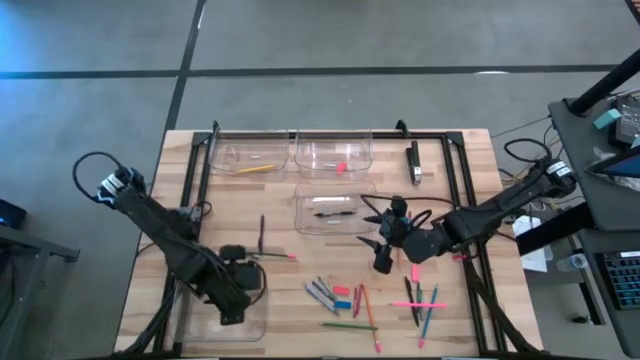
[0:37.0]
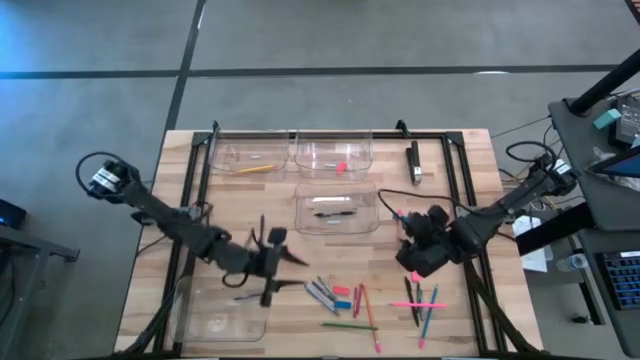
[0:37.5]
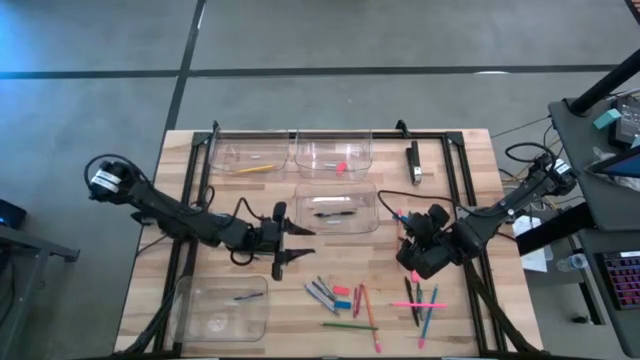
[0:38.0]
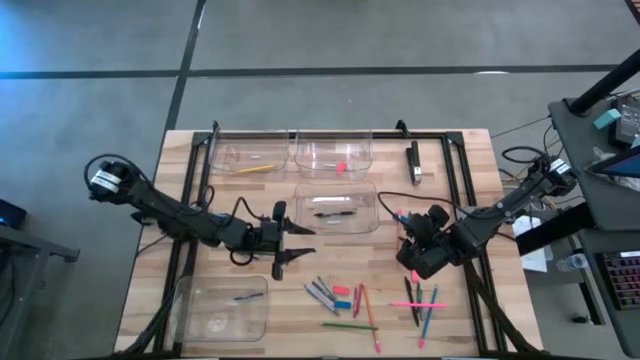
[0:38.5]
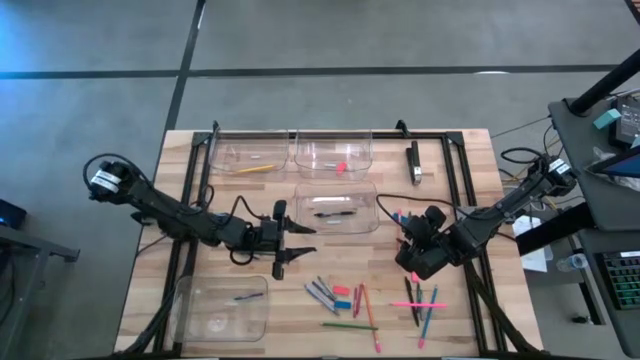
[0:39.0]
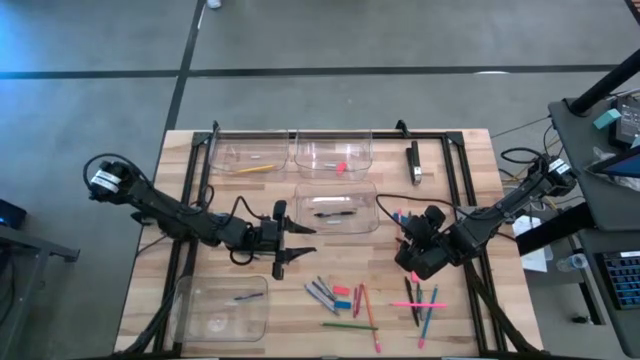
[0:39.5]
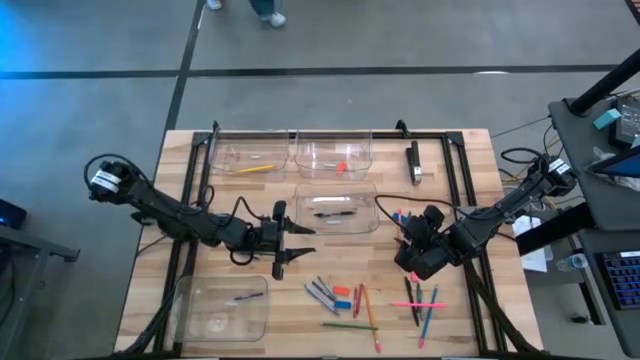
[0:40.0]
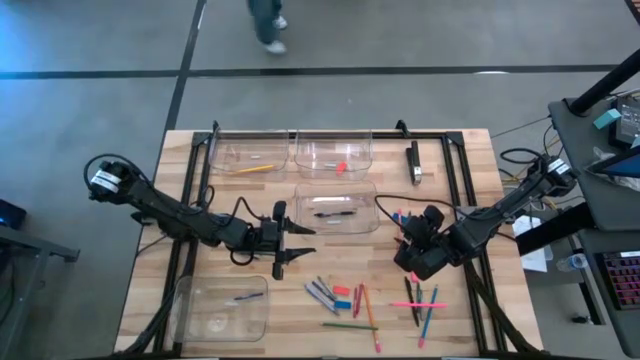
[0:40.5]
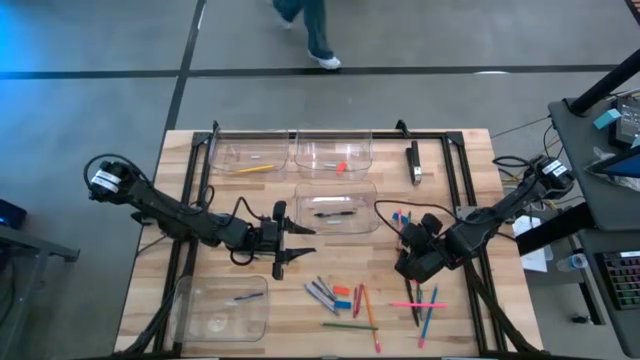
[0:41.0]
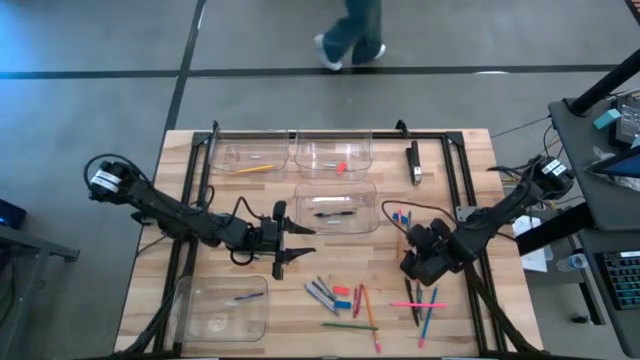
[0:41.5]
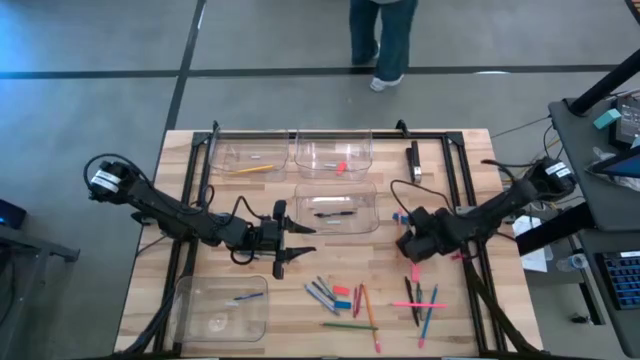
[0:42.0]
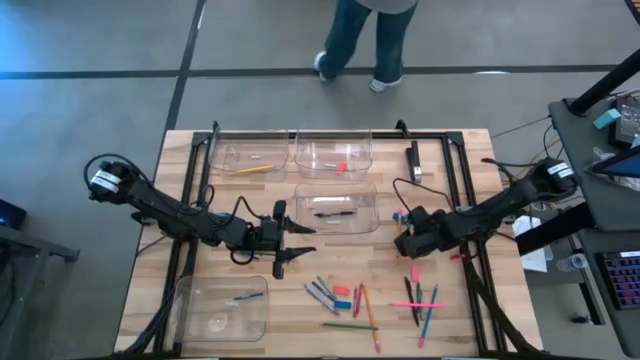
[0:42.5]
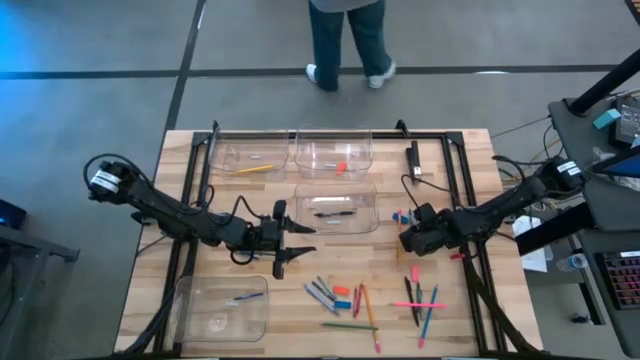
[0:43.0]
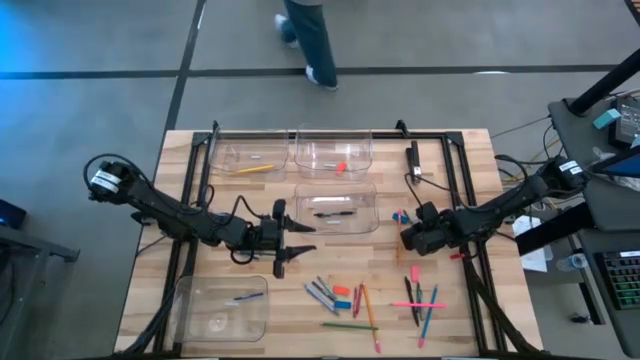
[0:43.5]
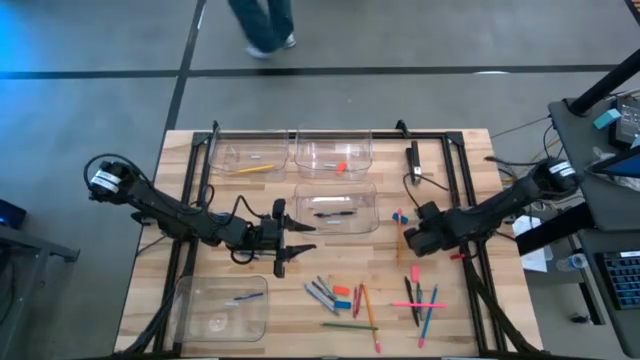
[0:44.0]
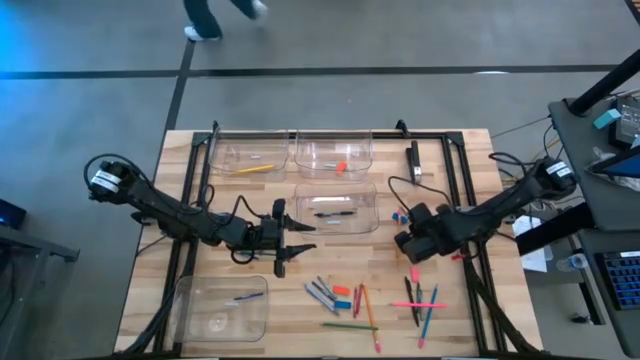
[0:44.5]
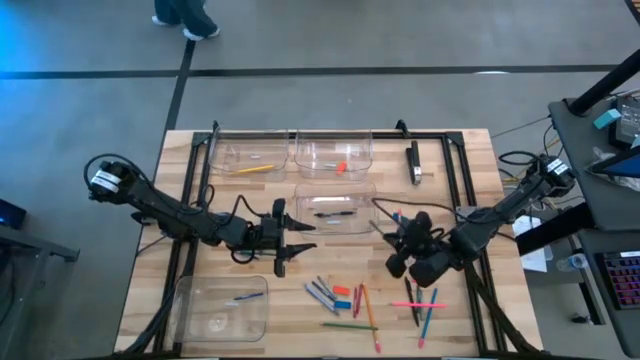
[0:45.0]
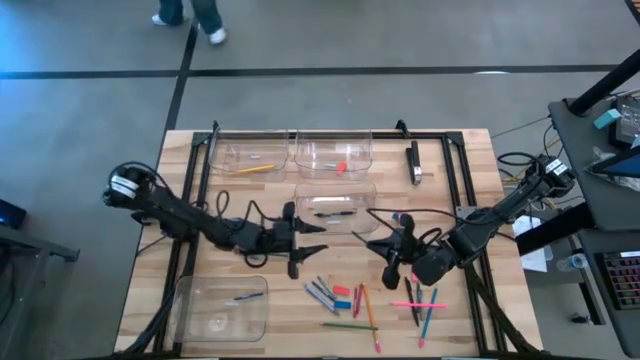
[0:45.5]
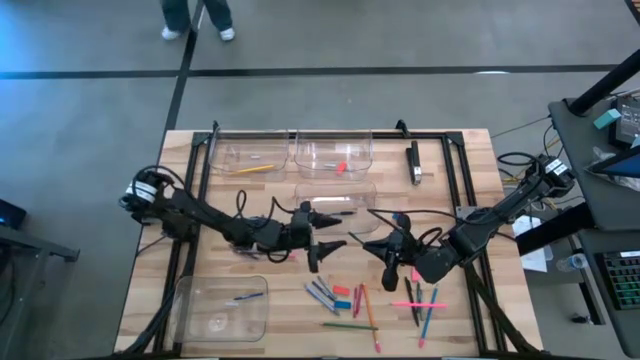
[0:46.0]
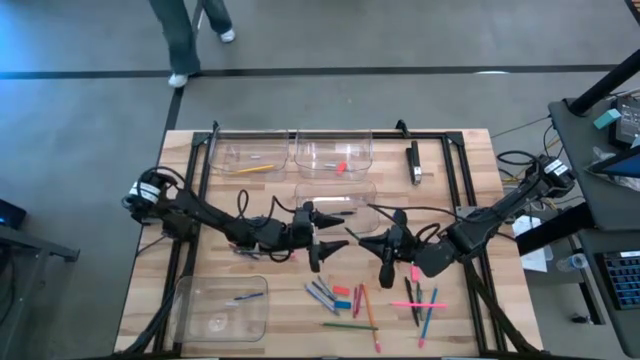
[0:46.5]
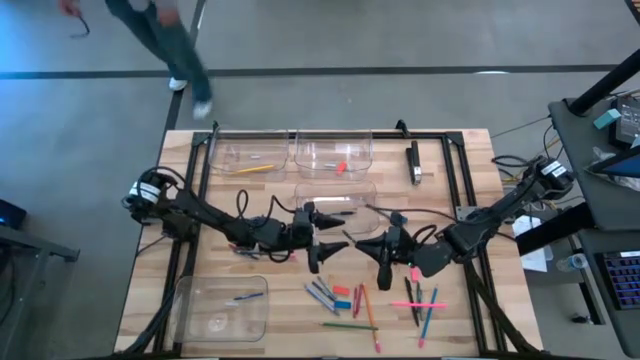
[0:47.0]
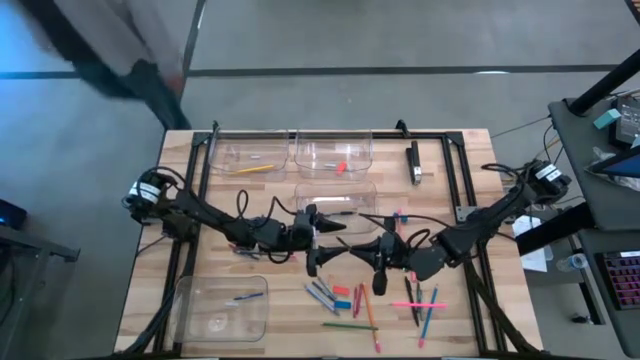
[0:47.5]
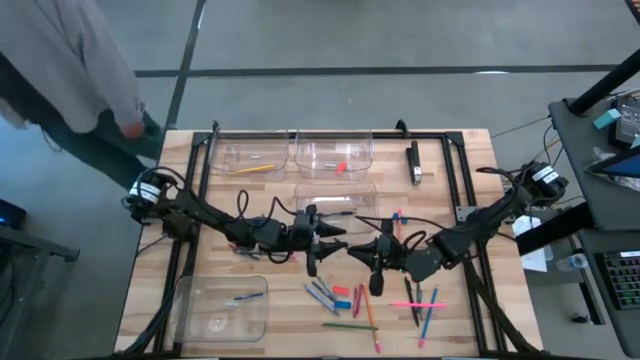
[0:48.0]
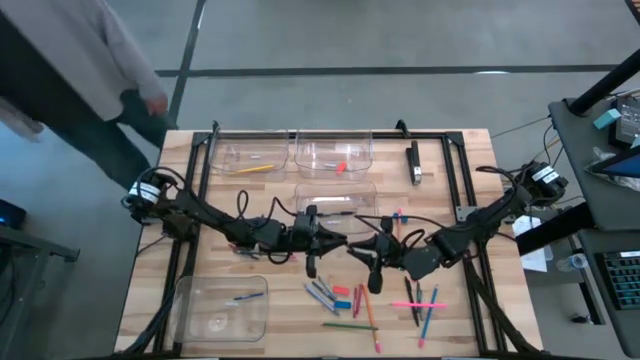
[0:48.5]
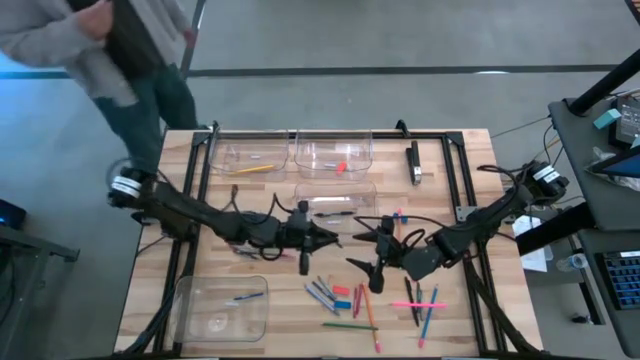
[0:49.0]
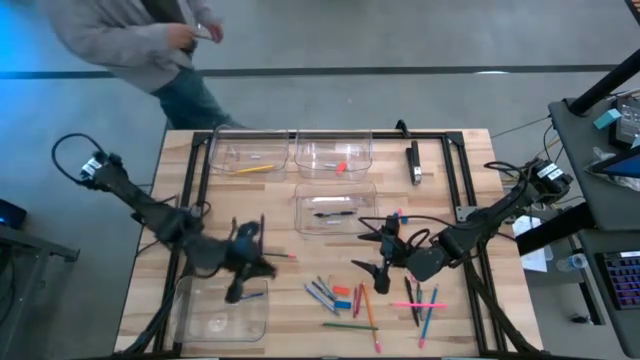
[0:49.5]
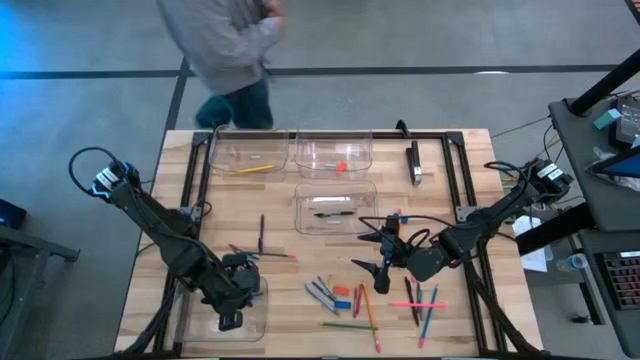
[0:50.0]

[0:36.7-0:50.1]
Task: Sort crayons/erasers/pens/pencils in bins
Put the top green crayon into the bottom transparent bin

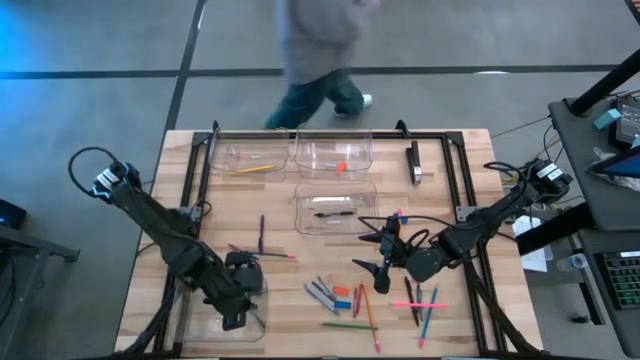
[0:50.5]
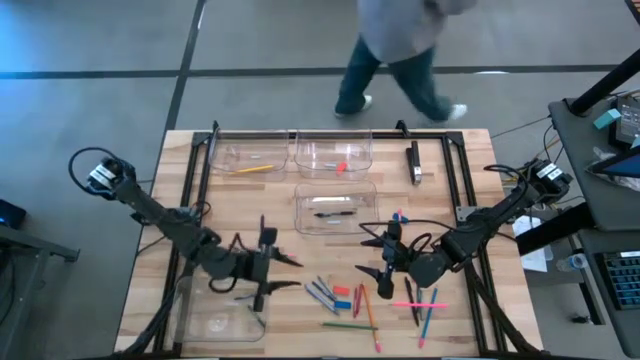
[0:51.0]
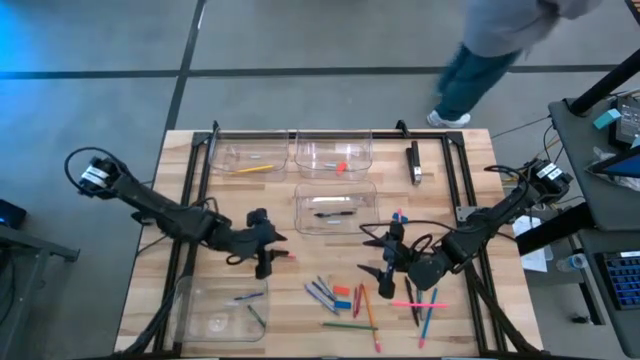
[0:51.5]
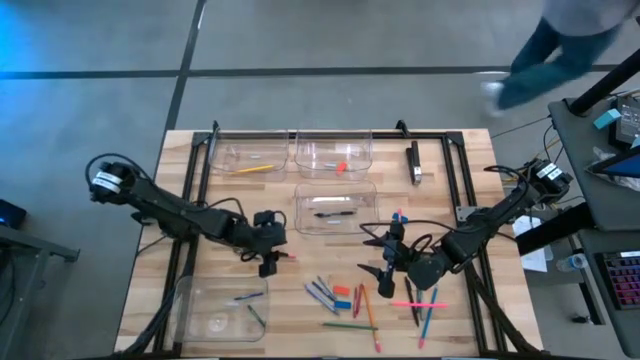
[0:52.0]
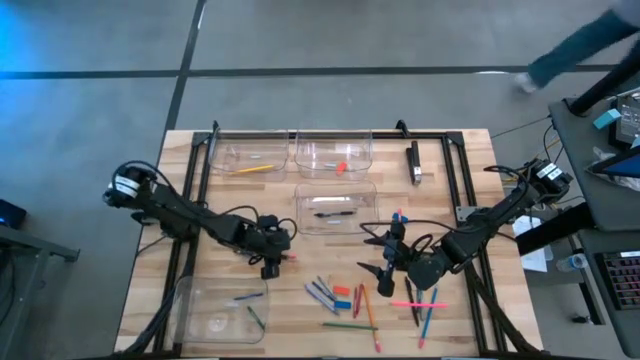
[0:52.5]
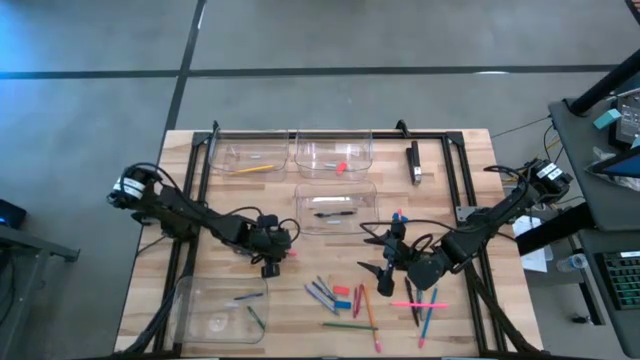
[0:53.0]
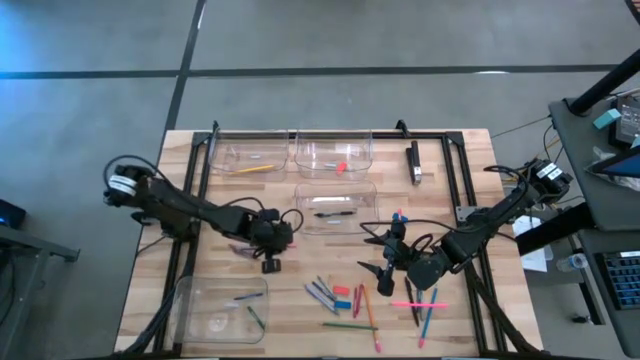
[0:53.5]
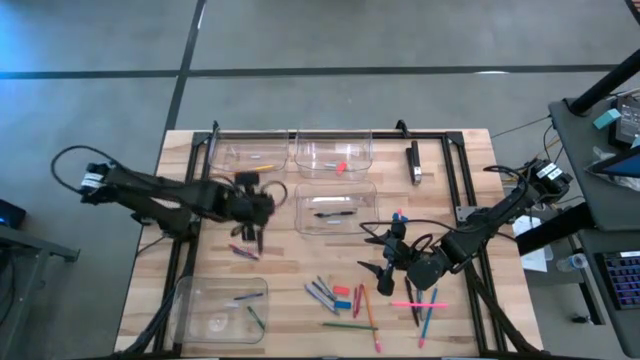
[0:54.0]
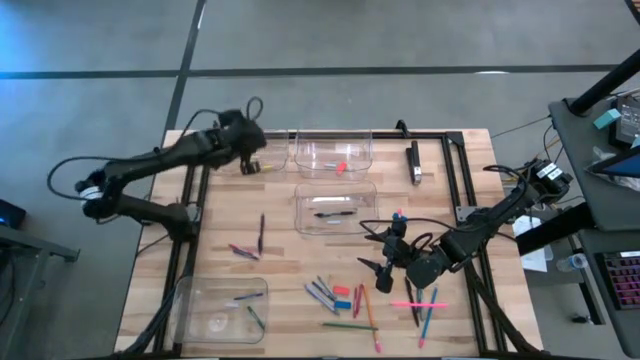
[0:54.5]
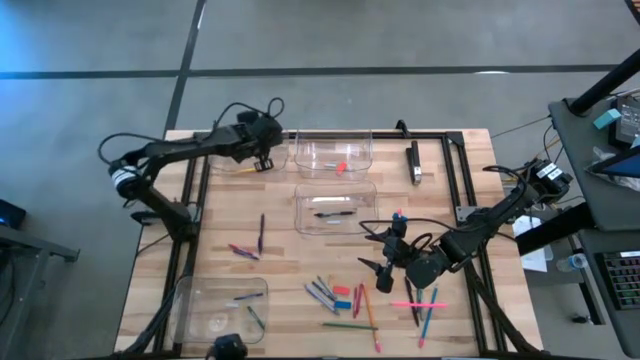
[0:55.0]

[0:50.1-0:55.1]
Put the top green pencil into the top left transparent bin

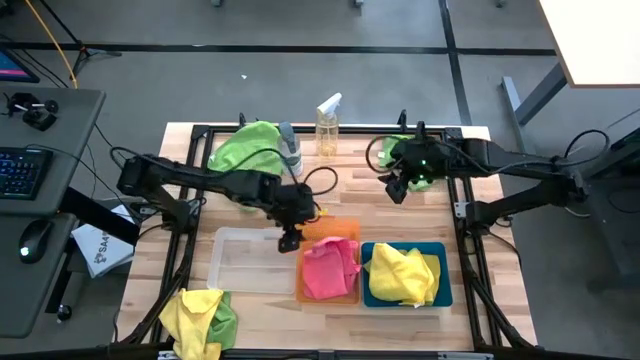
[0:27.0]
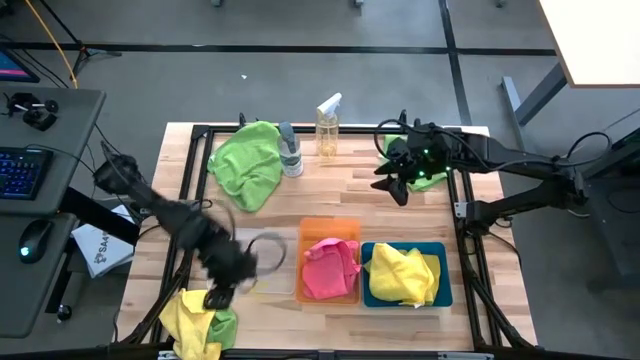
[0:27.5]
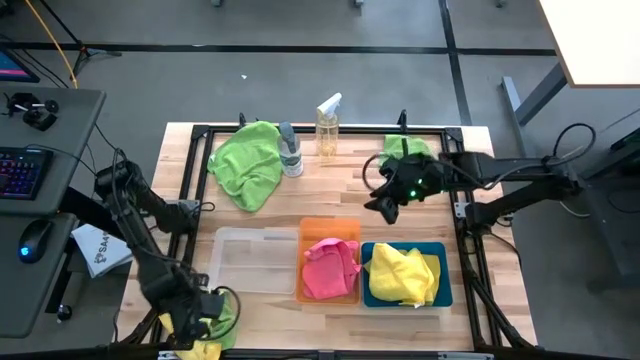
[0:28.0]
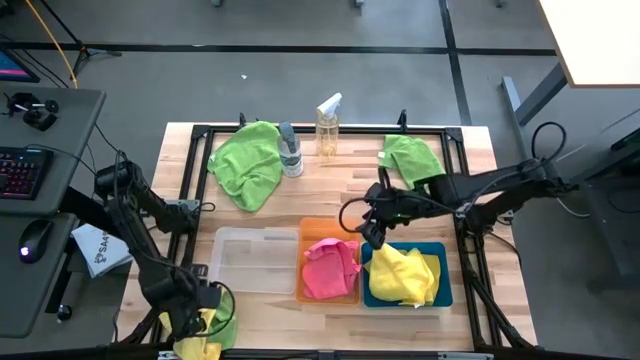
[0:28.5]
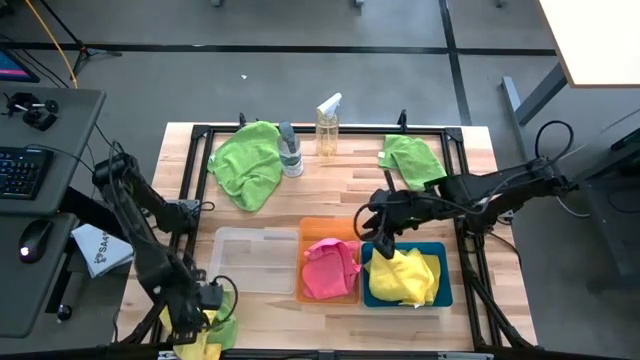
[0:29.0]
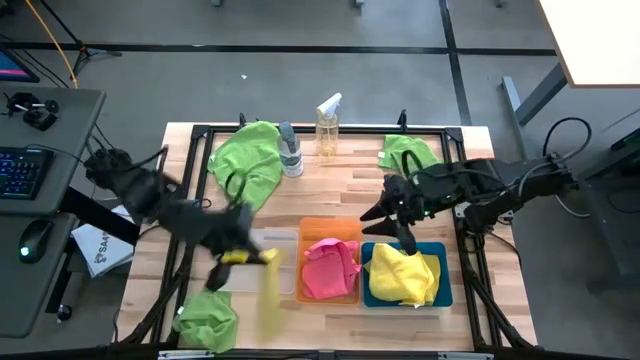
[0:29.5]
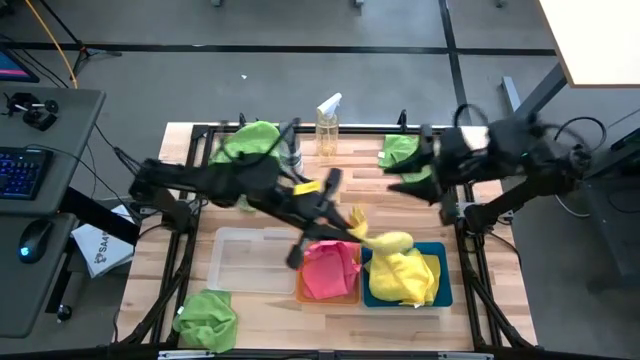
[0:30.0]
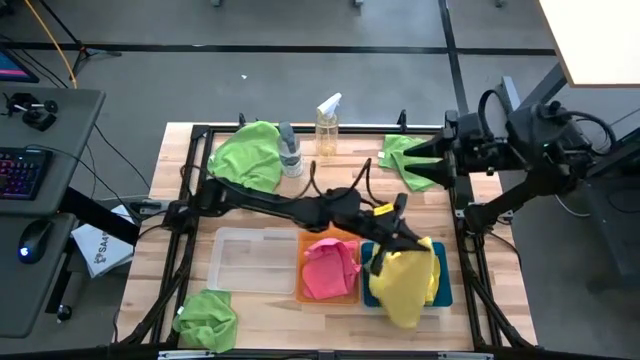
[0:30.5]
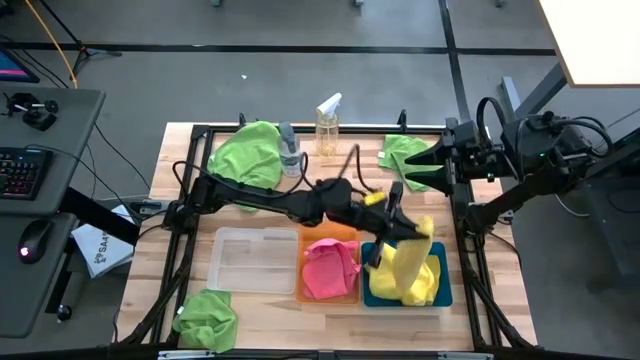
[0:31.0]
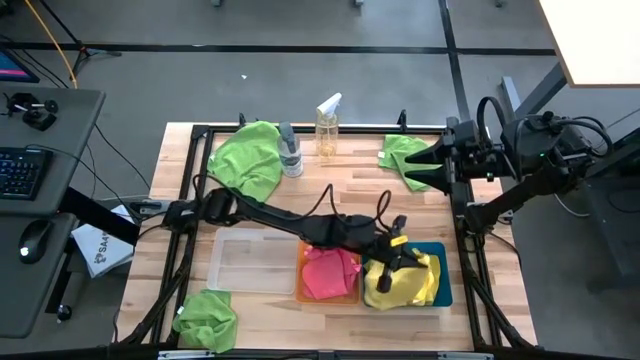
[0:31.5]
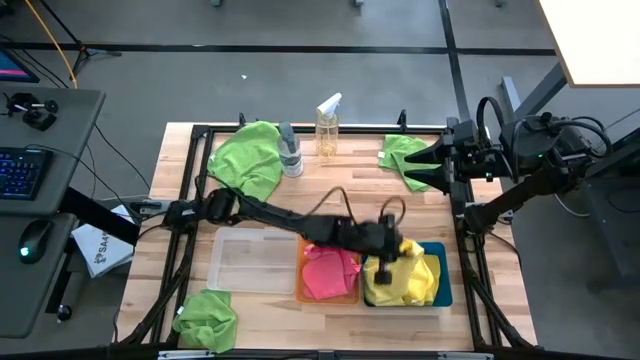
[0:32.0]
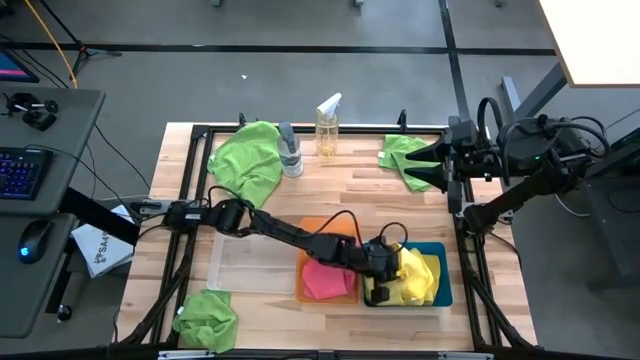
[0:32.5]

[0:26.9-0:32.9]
Task: Sort microfiber towel by color & place in baskets
Put the yellow towel into the blue bin
